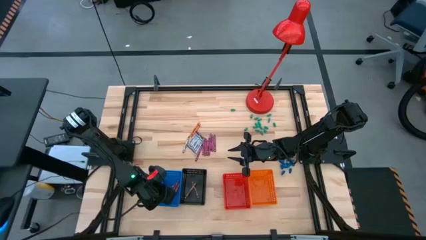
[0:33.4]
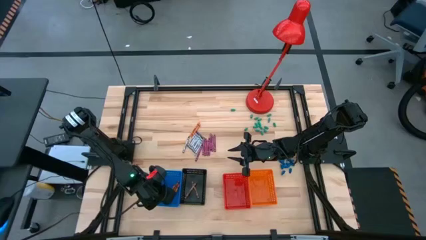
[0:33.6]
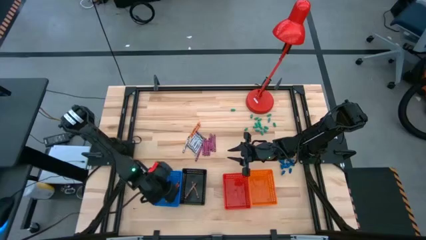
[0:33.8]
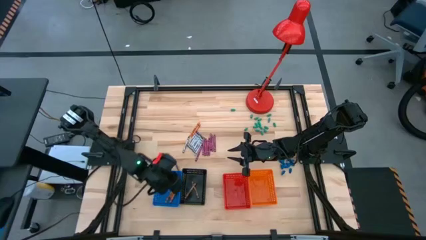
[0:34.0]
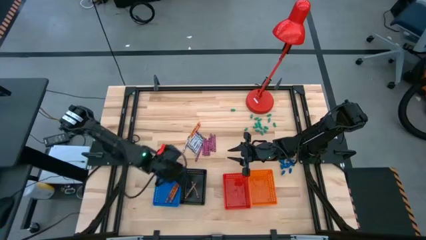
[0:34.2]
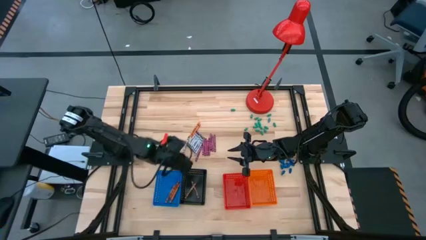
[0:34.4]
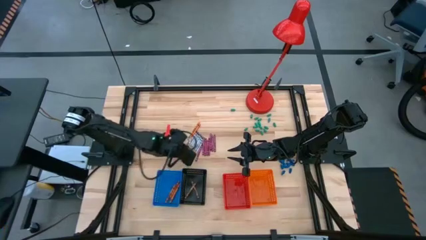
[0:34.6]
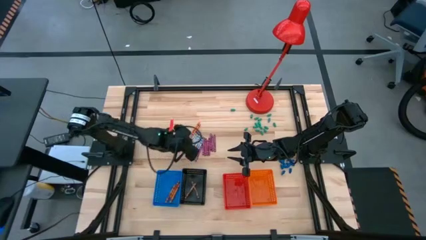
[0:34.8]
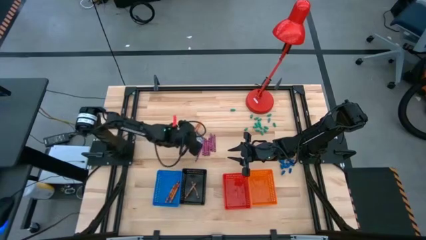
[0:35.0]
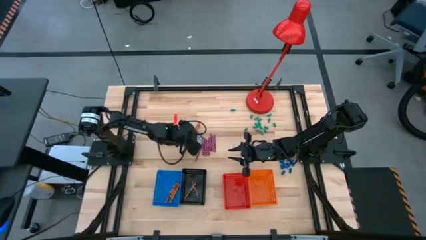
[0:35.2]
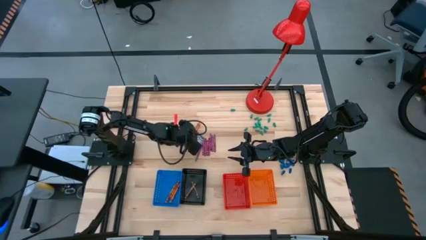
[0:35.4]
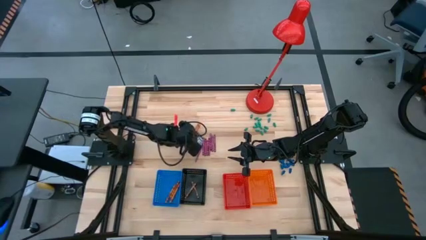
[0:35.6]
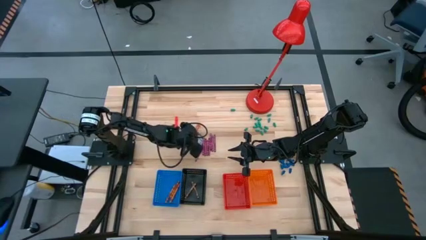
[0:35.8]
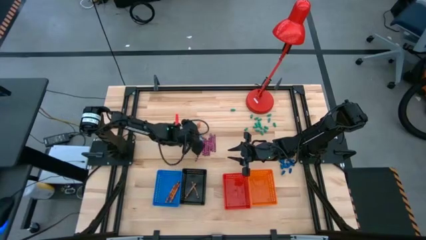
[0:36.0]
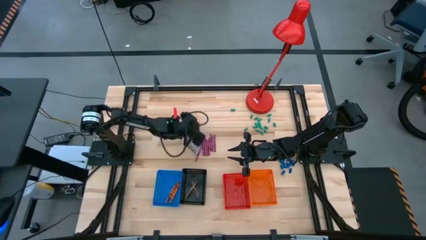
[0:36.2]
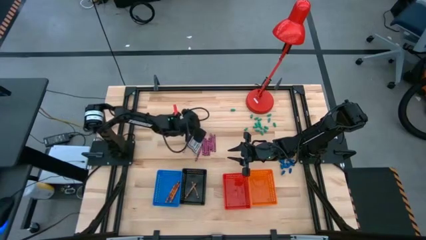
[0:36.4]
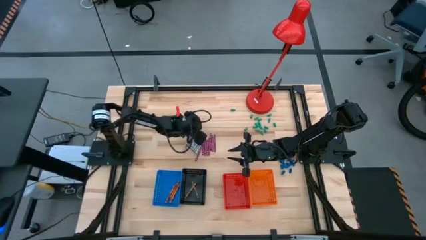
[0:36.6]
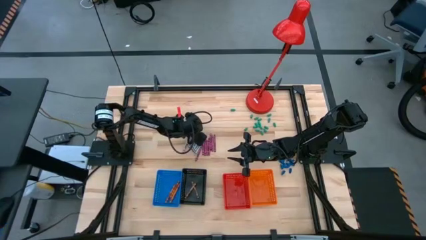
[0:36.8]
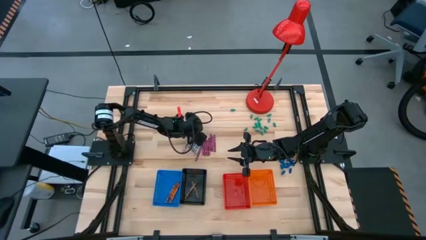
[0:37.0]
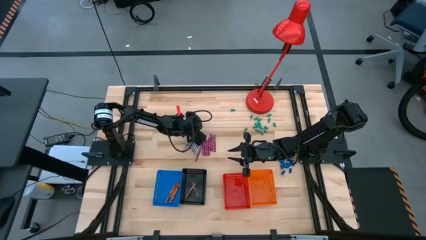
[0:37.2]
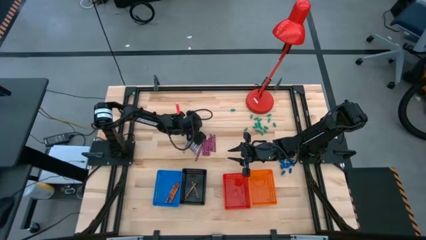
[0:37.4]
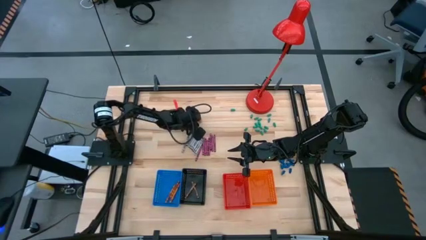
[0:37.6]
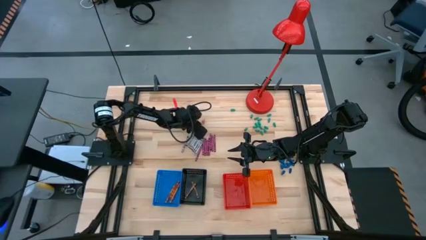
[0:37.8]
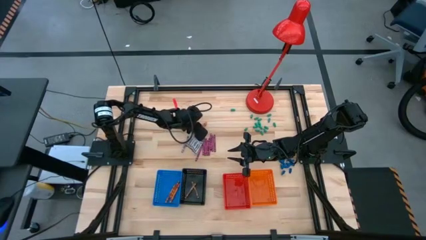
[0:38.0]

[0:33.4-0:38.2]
Task: Sort crayons
Put the orange crayon into the blue basket

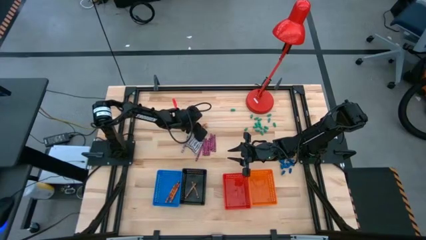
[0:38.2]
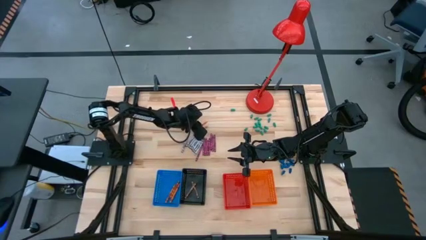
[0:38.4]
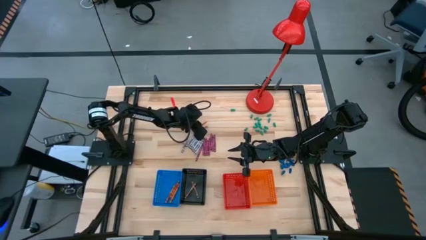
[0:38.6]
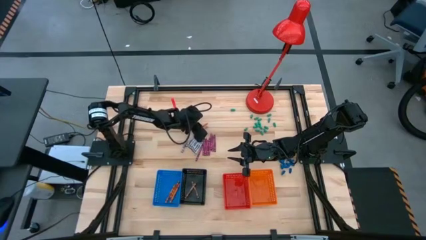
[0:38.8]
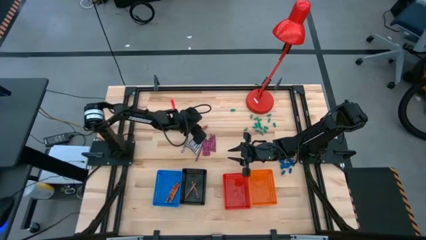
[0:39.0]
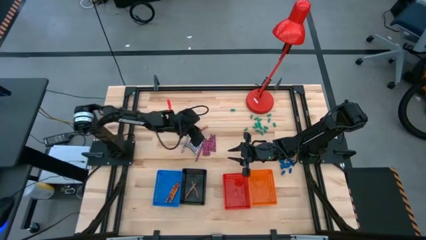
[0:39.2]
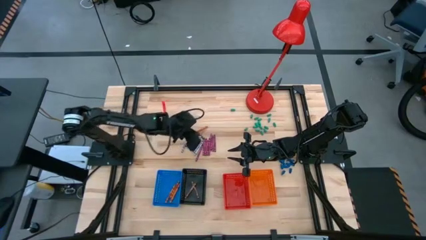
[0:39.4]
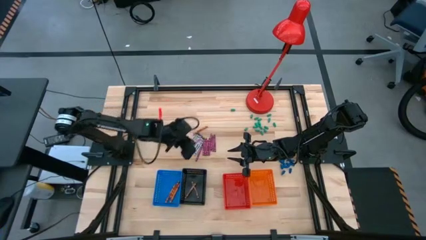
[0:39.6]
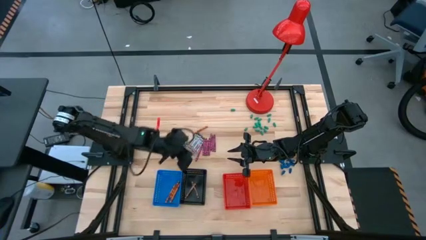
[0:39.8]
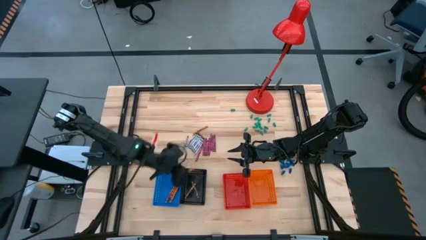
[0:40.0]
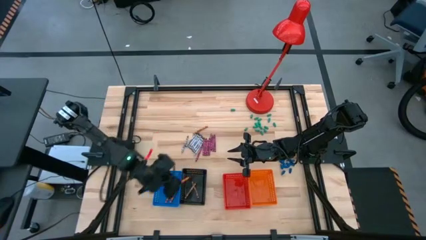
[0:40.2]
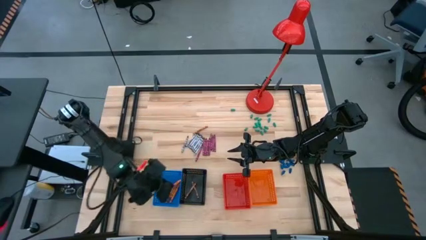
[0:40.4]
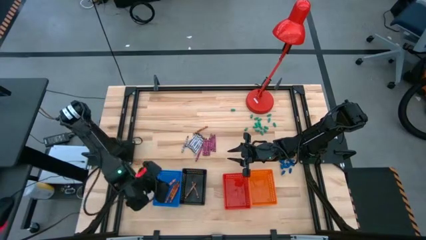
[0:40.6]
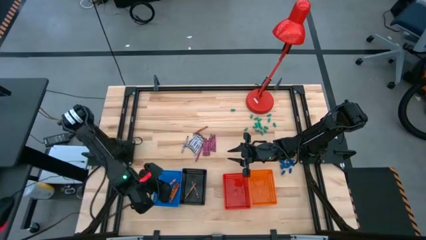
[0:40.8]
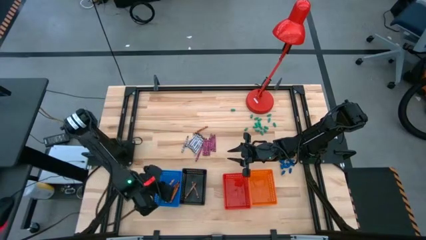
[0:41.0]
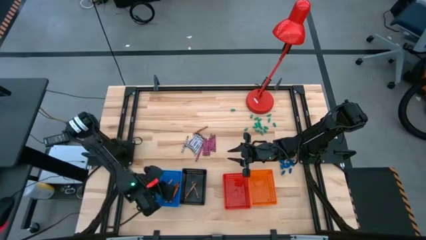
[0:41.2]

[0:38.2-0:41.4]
Put the orange crayon into the blue basket

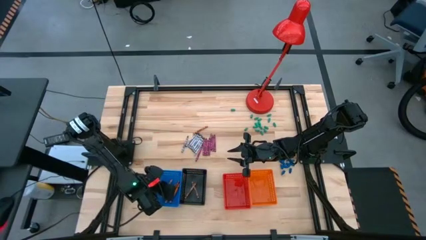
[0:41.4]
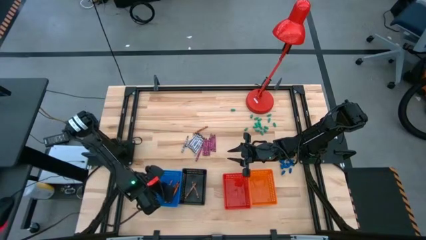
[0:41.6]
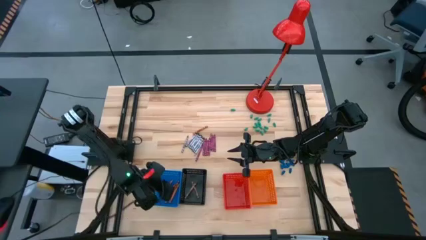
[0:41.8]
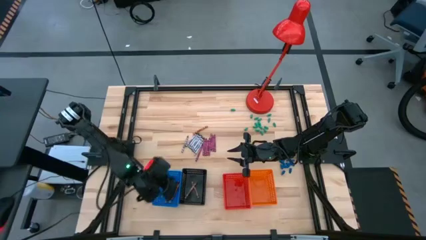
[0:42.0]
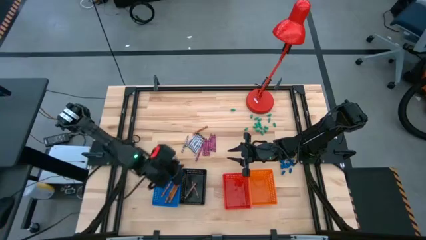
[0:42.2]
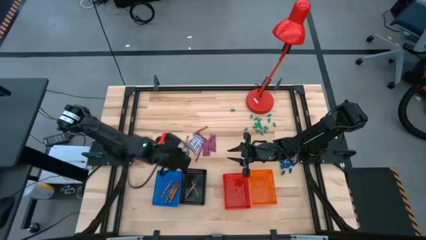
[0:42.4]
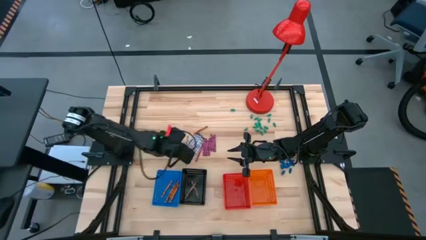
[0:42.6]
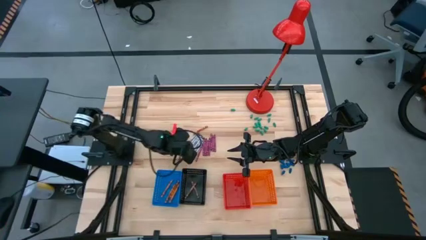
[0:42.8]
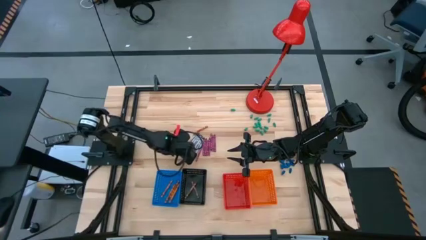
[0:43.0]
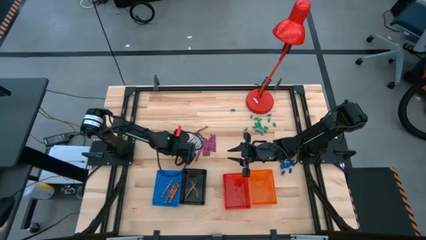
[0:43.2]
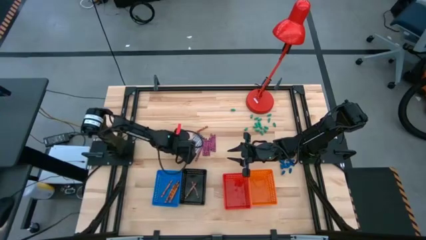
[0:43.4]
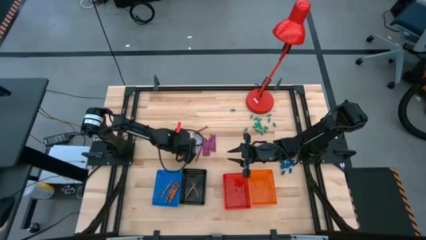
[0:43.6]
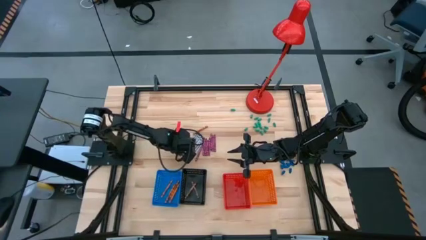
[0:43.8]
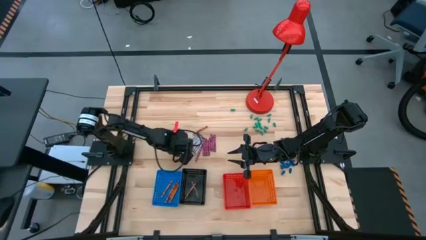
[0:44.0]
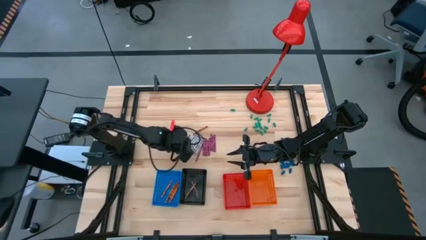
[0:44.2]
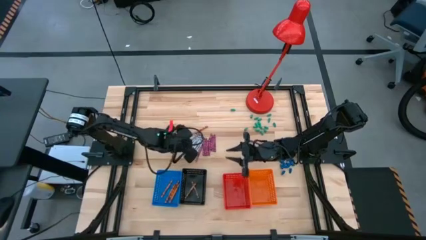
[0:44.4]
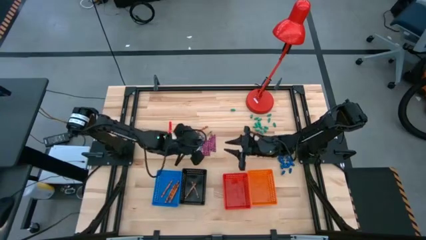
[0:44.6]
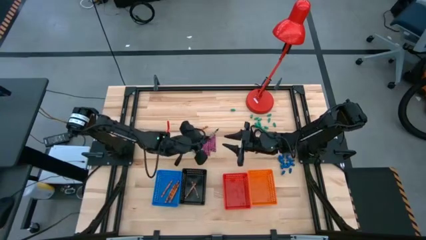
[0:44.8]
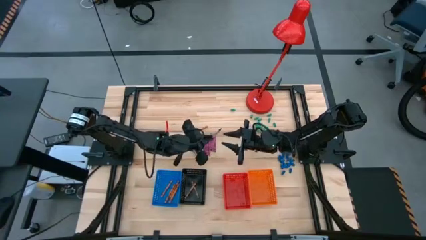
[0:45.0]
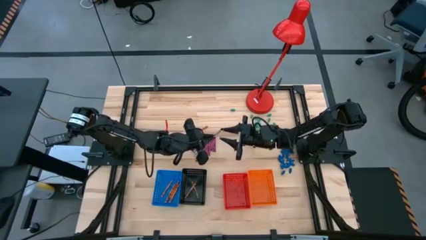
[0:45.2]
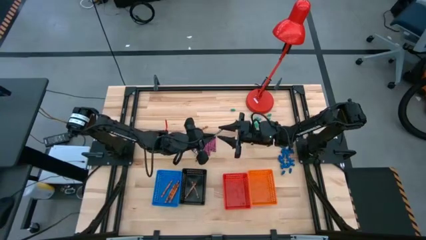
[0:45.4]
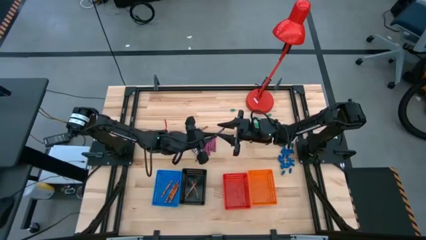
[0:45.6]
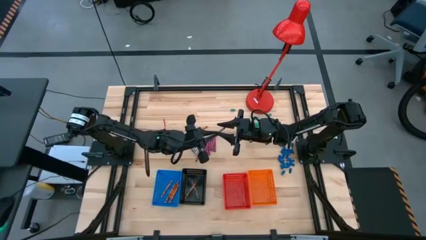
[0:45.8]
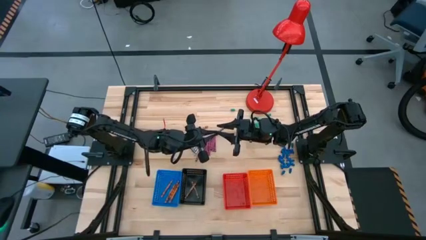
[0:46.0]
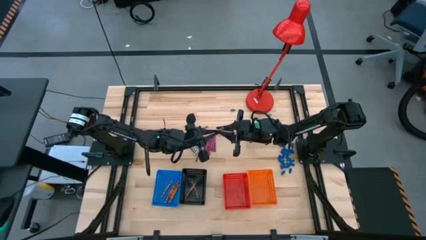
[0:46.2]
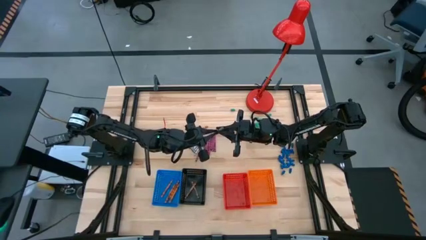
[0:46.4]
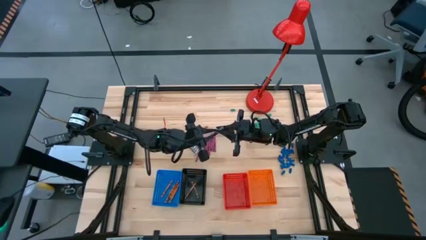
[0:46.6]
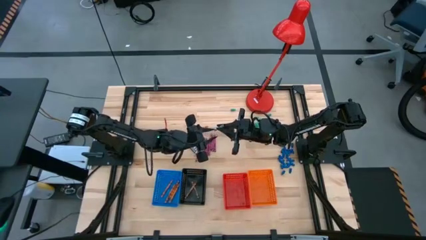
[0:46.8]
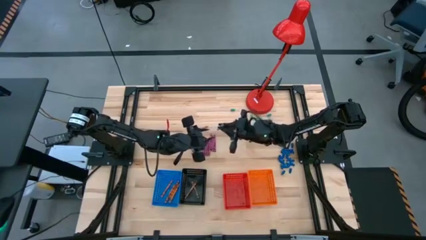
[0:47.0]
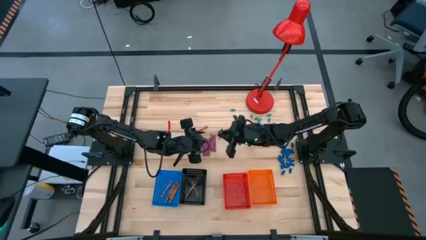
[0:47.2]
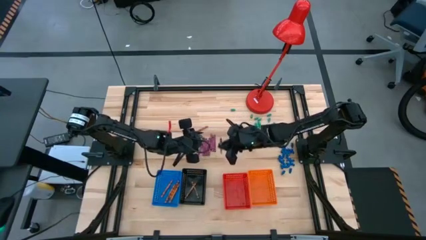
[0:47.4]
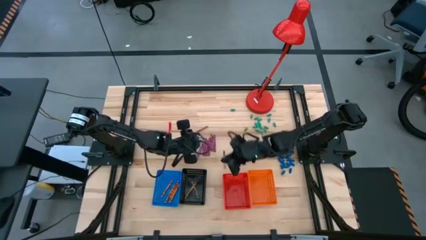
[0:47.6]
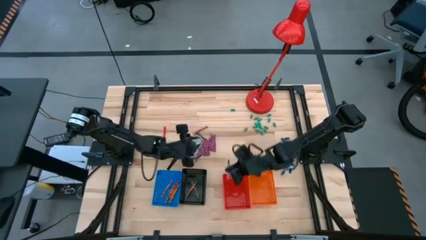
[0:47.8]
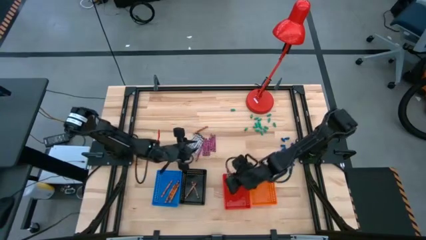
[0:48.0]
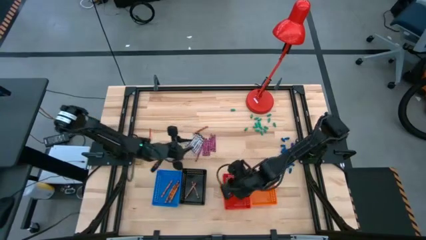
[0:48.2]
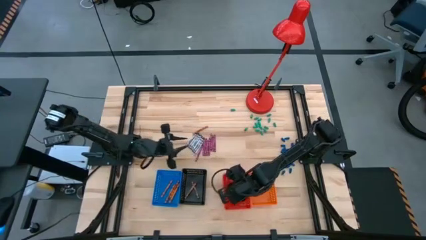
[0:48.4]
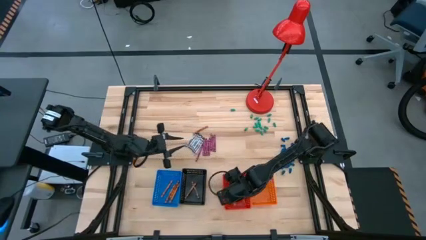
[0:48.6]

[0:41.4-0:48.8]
Put the black crayon into the red basket

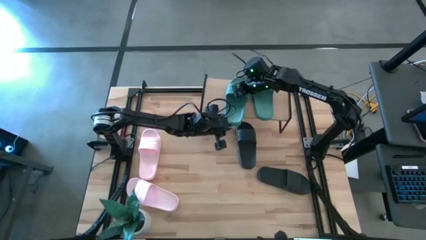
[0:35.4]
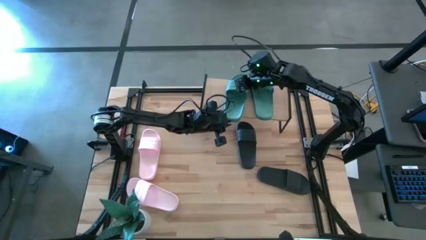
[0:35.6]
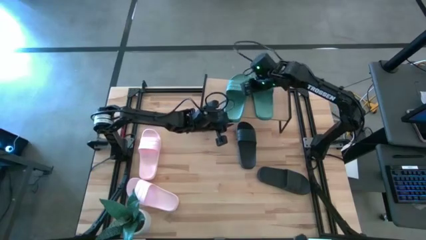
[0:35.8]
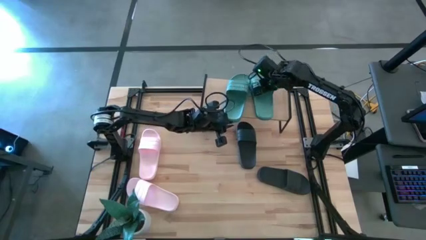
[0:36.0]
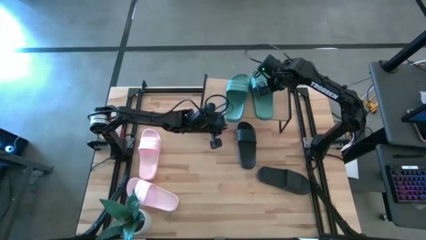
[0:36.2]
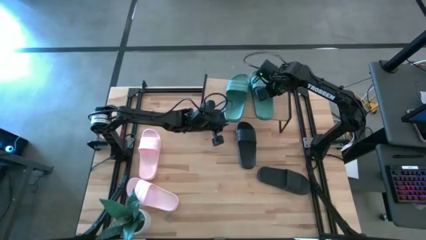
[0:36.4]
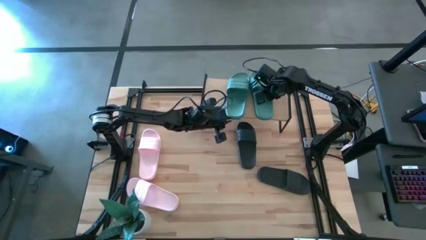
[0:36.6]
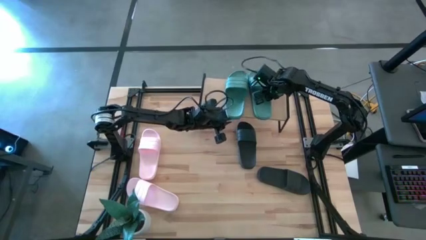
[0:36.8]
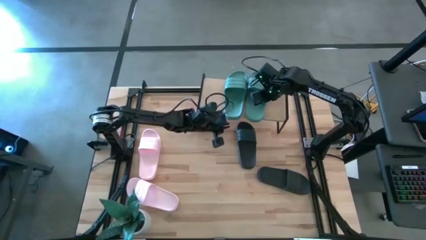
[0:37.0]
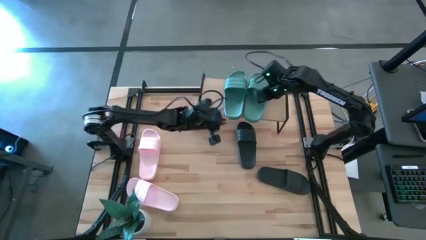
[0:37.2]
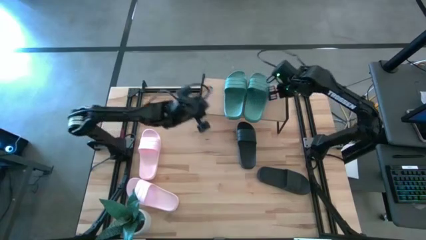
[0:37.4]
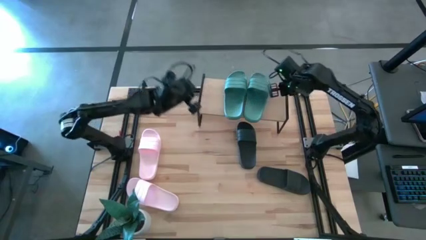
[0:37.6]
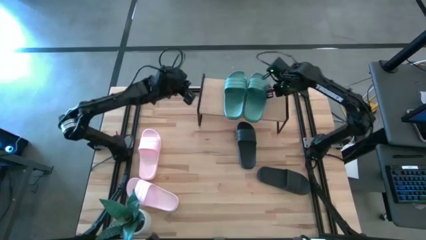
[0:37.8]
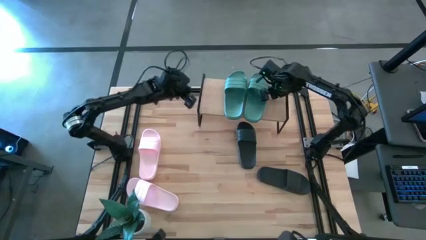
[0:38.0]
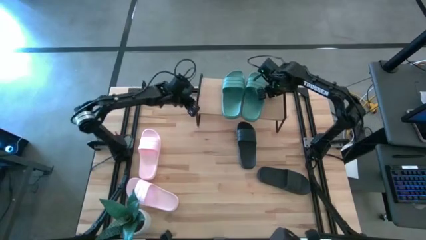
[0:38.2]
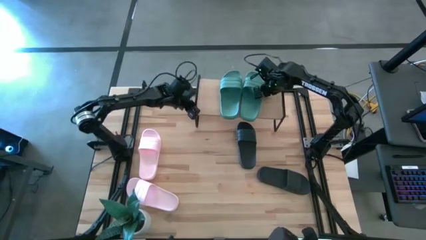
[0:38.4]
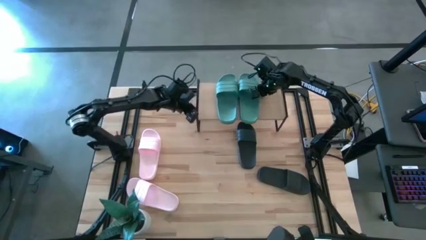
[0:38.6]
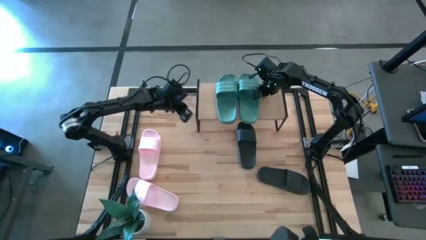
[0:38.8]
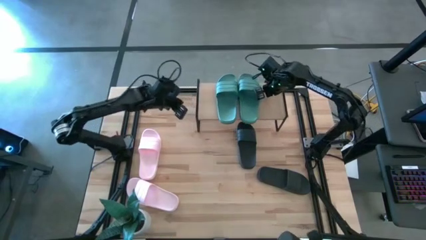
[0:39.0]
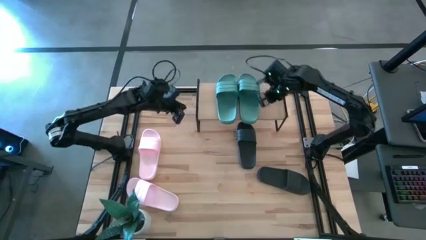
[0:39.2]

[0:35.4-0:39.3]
Task: Pick and place slides into the shelf
Adjust the green slides on the shelf
